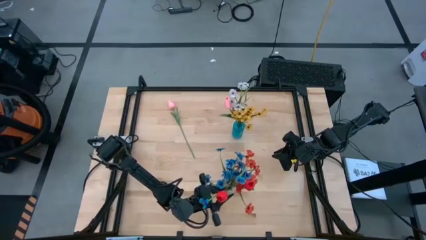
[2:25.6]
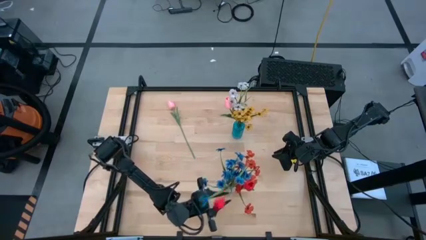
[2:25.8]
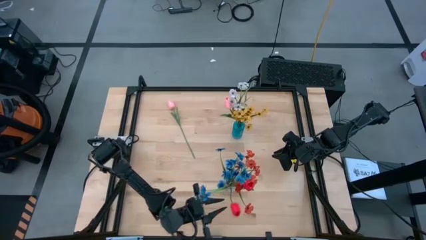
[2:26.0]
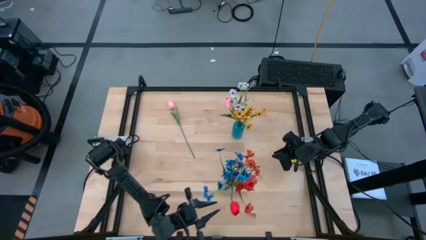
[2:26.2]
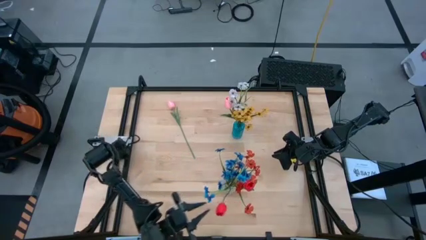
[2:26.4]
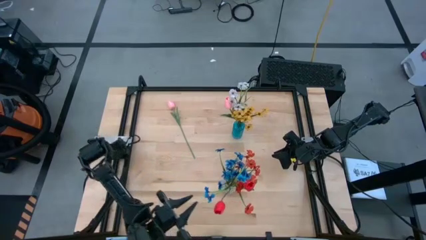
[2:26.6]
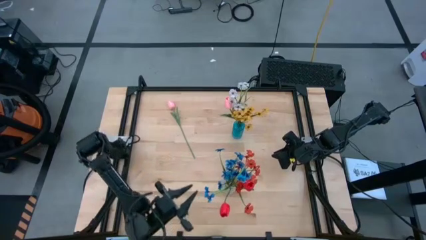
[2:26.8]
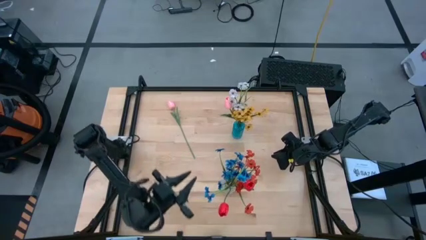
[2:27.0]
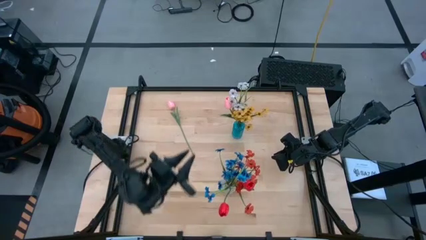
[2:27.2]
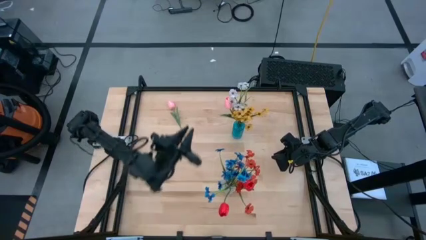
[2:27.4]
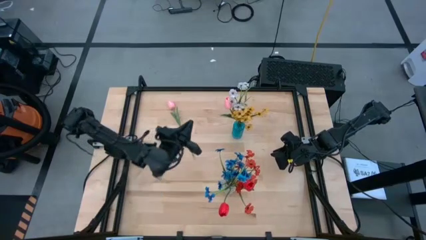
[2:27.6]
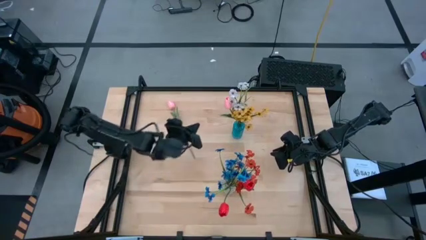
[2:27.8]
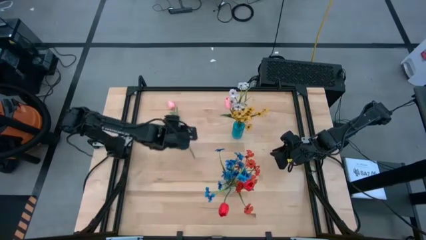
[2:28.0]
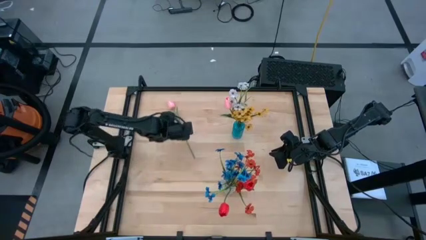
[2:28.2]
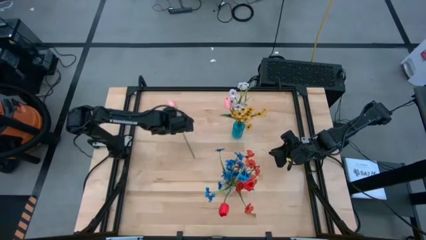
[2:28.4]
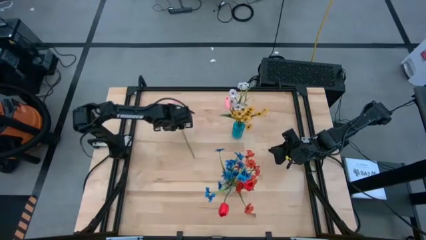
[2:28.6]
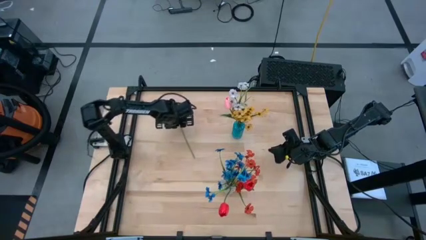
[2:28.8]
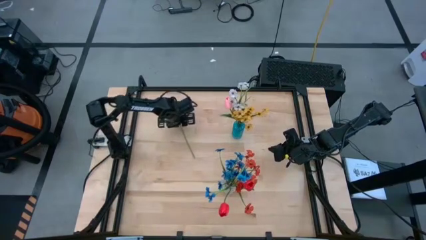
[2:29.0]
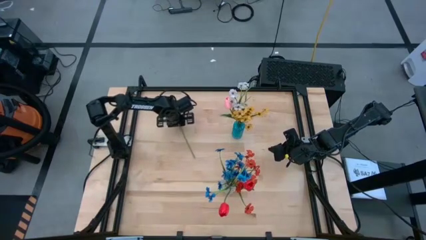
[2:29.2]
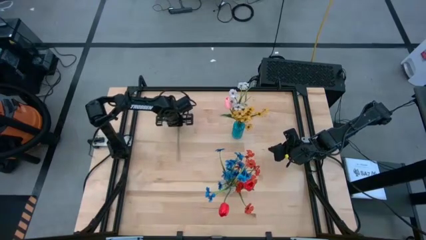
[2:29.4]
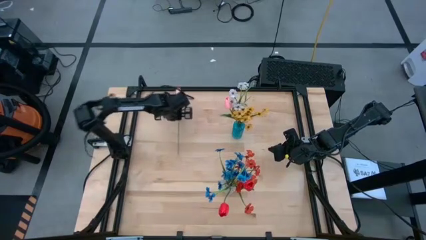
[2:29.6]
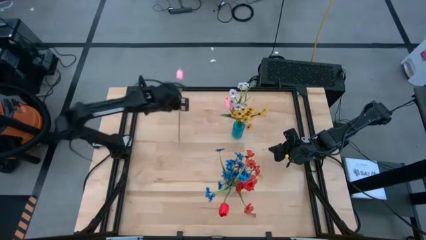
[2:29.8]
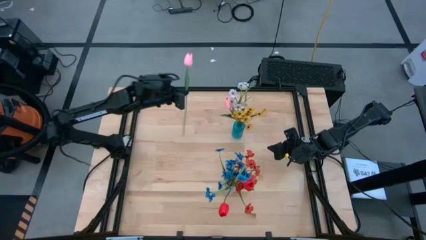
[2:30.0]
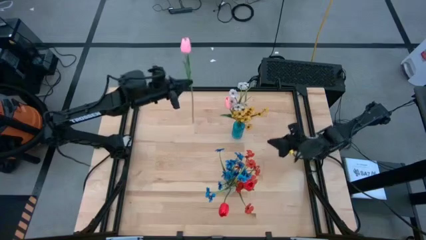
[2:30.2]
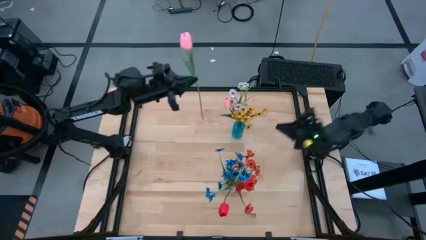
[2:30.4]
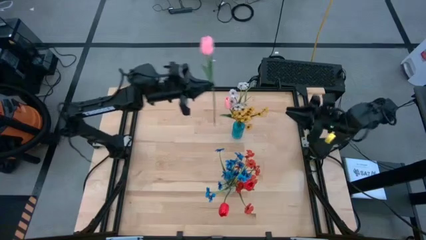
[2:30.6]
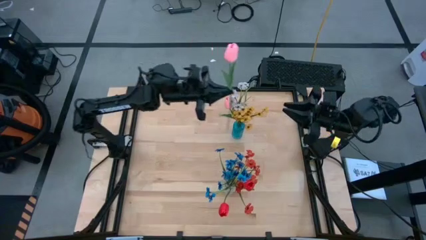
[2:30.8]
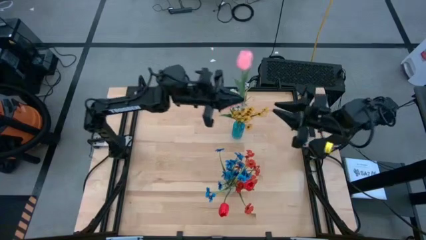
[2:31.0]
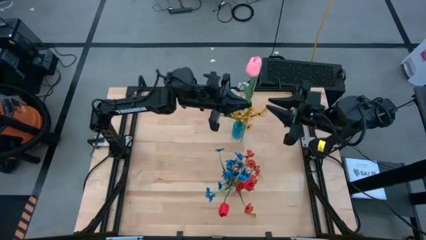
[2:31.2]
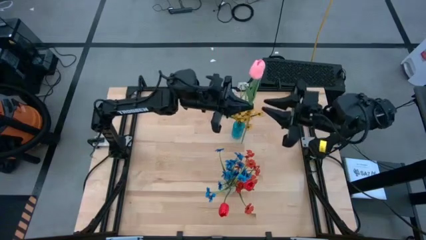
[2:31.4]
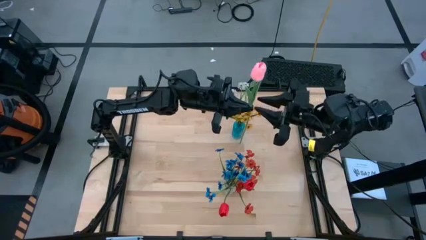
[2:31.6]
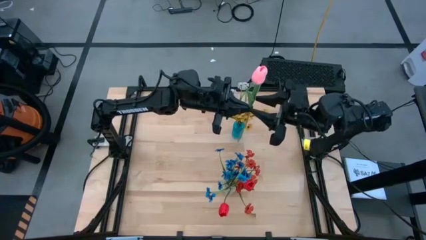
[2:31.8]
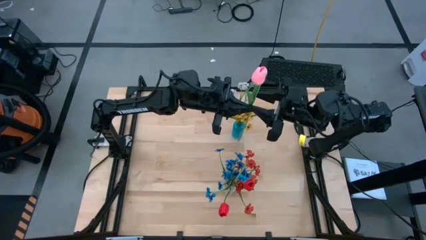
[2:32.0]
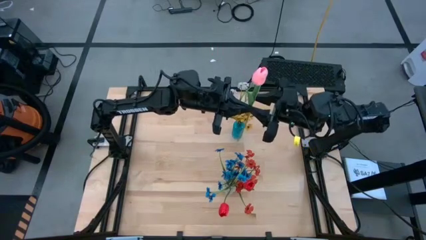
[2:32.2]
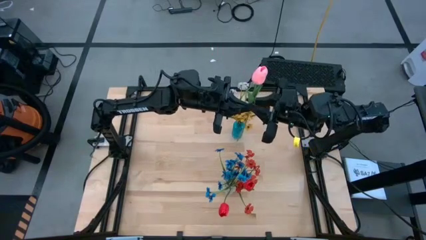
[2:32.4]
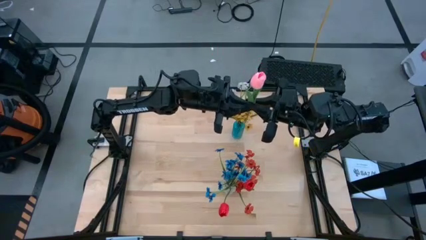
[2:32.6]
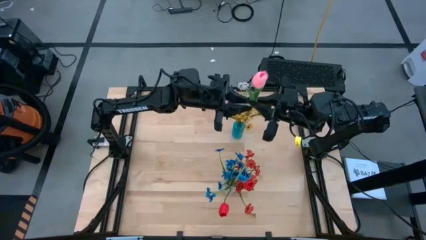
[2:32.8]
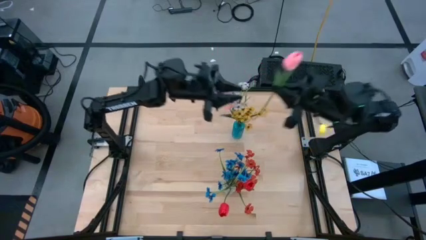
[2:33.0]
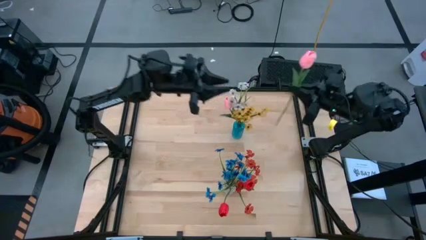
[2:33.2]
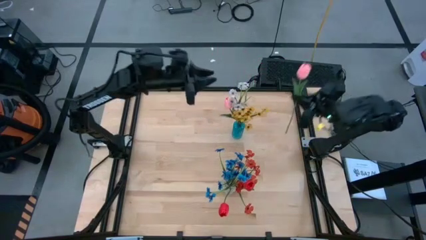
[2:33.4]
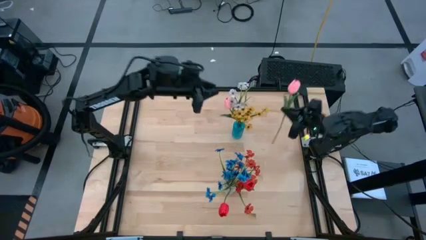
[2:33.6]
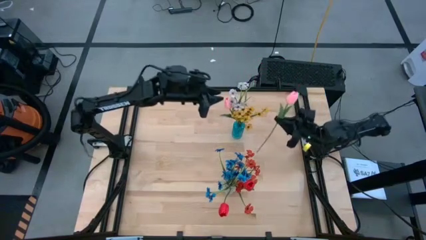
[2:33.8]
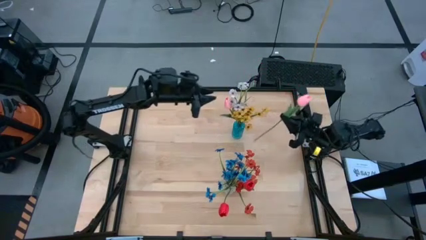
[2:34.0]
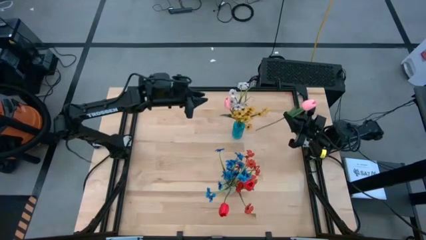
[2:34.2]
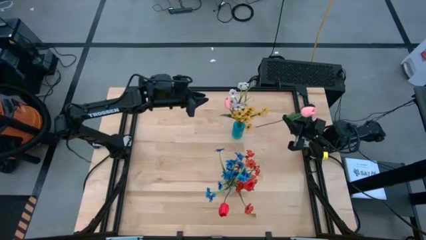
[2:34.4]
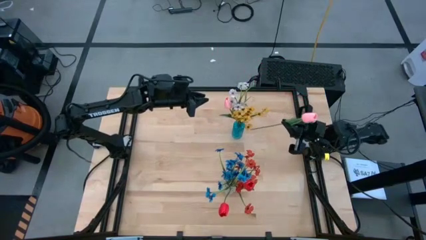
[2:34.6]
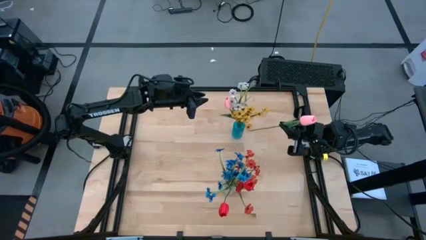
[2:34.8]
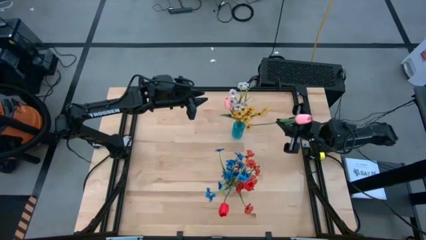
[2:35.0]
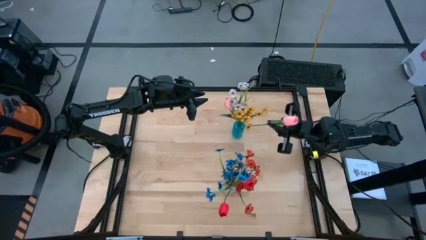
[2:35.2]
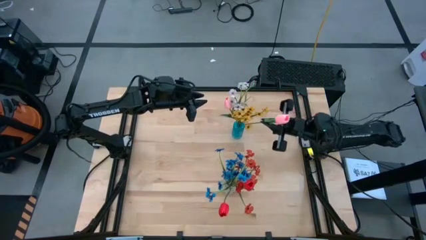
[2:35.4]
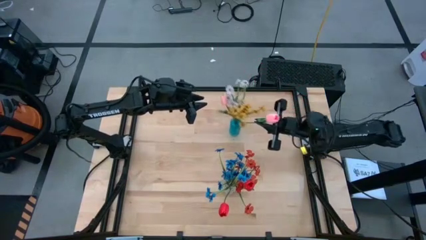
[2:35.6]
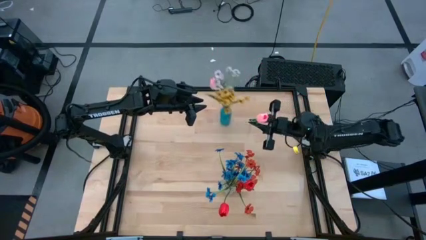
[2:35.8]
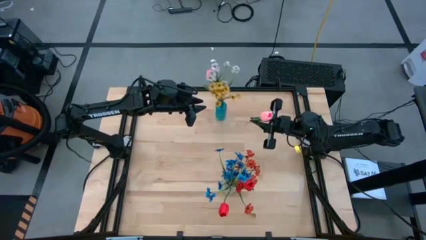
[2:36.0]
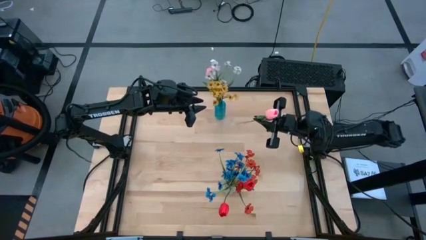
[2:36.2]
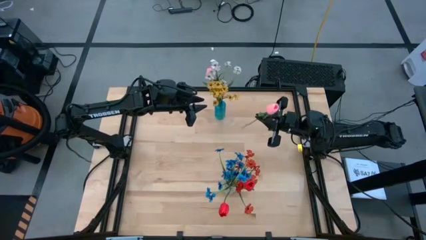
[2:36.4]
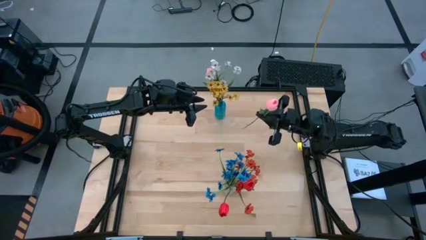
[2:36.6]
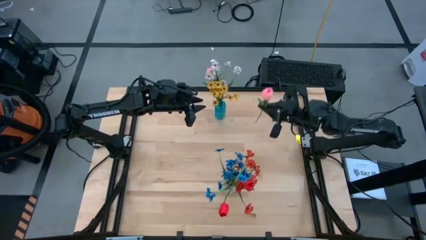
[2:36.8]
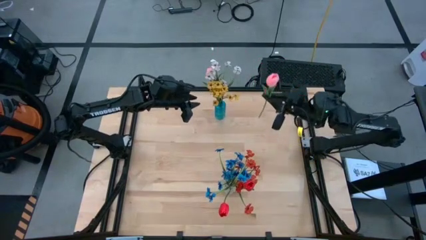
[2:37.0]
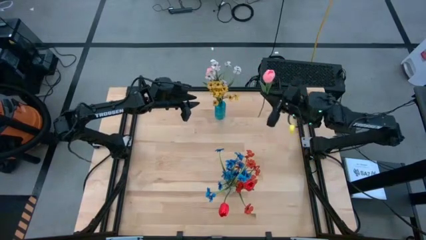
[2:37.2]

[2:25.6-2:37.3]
Task: Sort flowers into vase by color
Put the pink tulip into the blue vase
